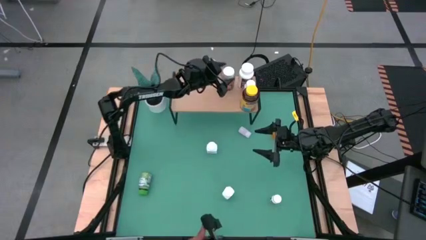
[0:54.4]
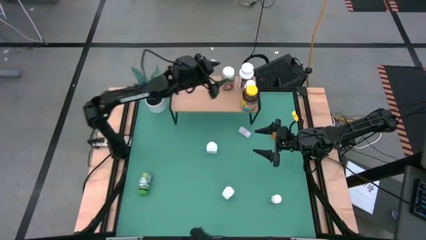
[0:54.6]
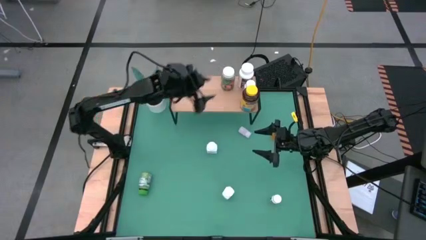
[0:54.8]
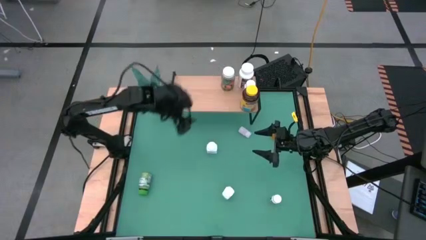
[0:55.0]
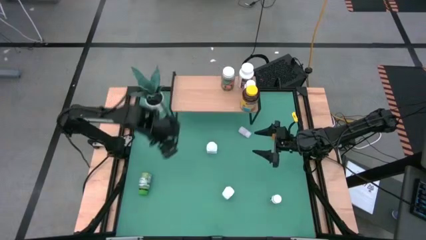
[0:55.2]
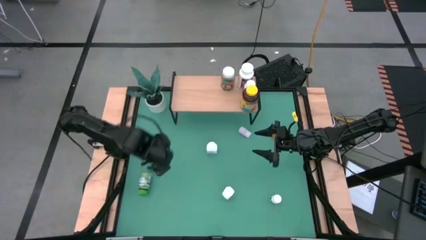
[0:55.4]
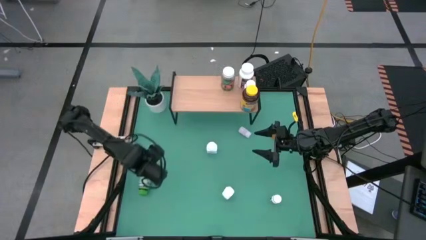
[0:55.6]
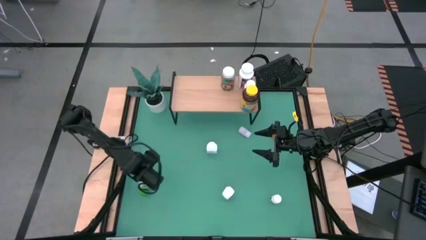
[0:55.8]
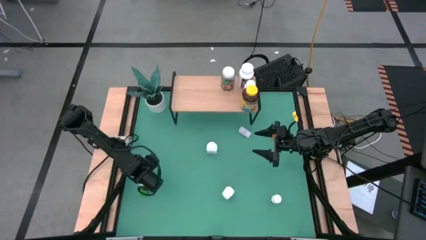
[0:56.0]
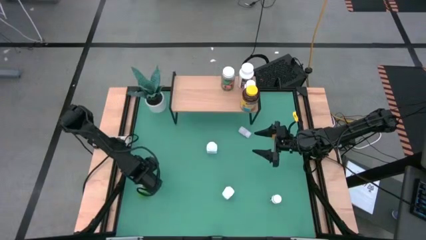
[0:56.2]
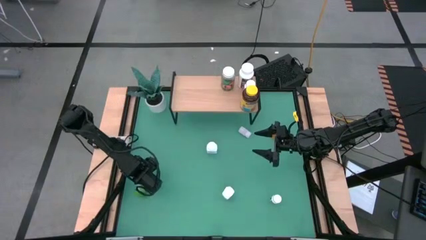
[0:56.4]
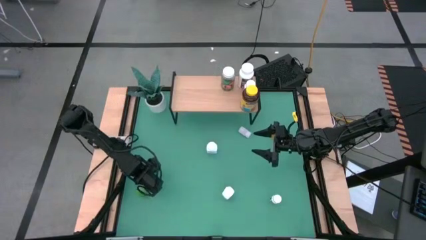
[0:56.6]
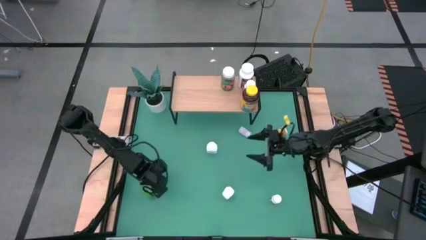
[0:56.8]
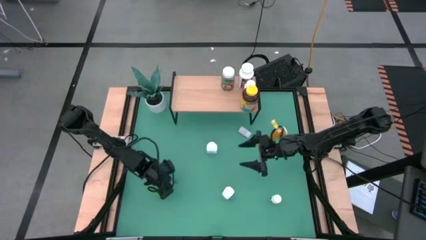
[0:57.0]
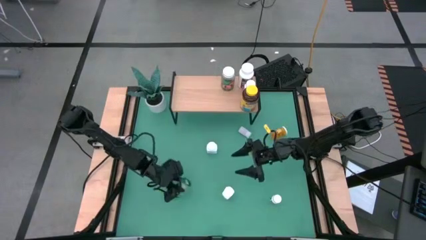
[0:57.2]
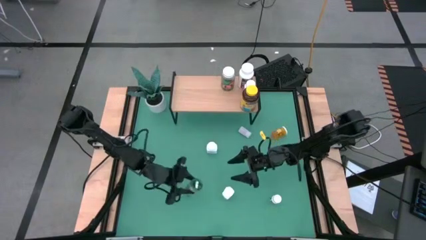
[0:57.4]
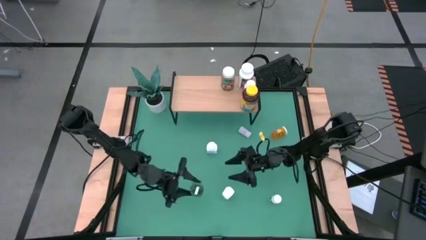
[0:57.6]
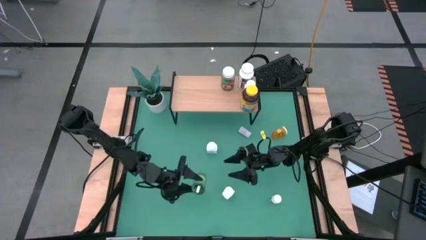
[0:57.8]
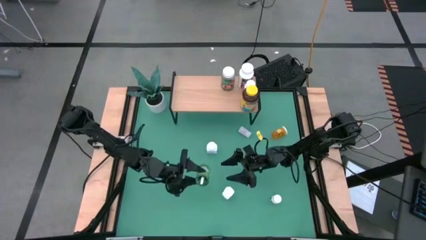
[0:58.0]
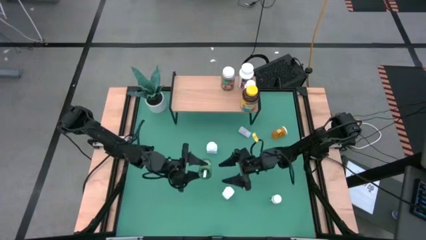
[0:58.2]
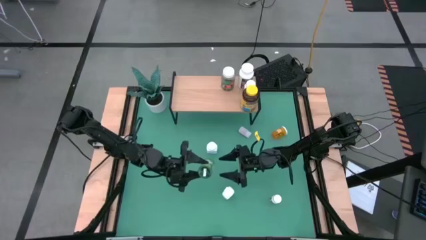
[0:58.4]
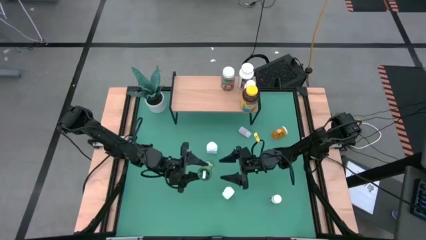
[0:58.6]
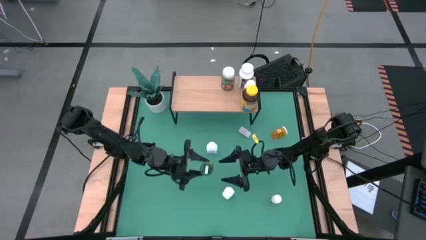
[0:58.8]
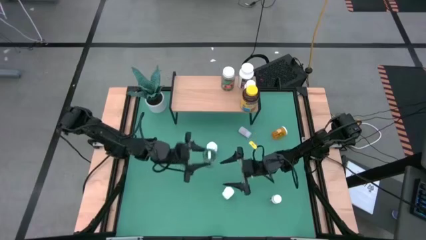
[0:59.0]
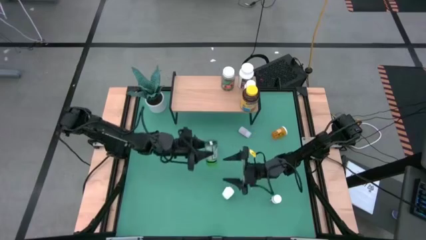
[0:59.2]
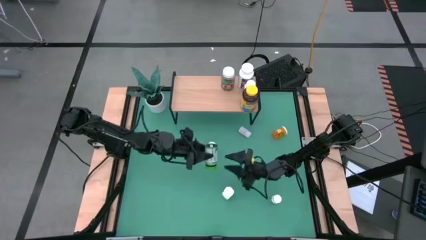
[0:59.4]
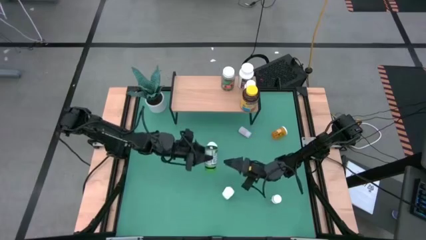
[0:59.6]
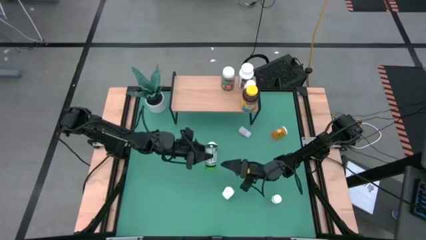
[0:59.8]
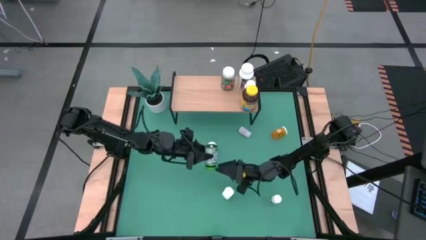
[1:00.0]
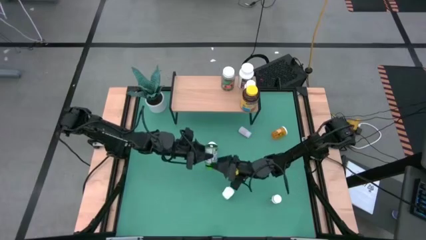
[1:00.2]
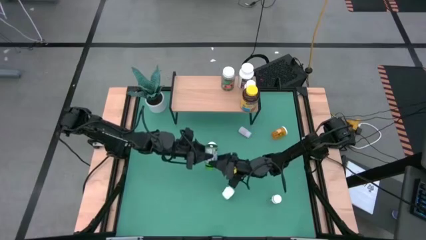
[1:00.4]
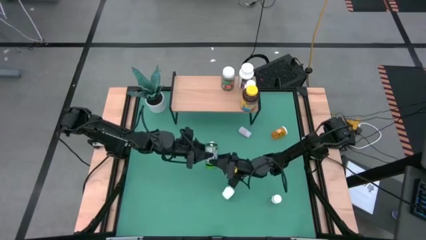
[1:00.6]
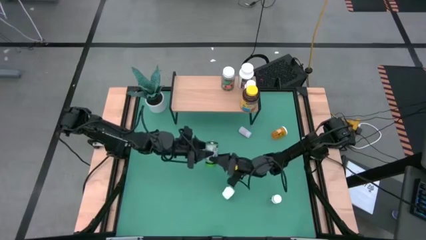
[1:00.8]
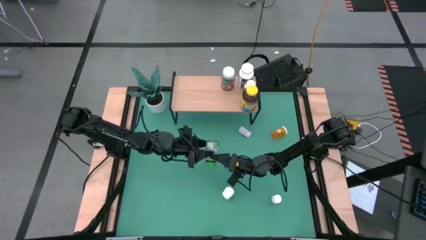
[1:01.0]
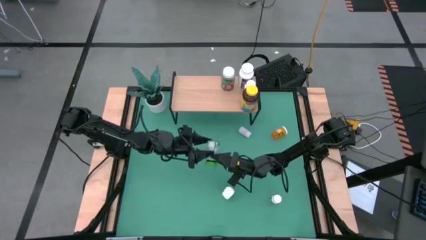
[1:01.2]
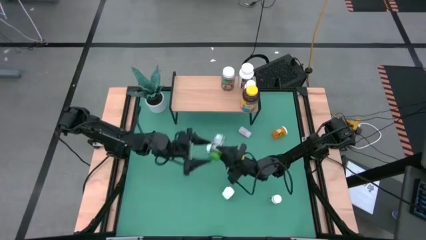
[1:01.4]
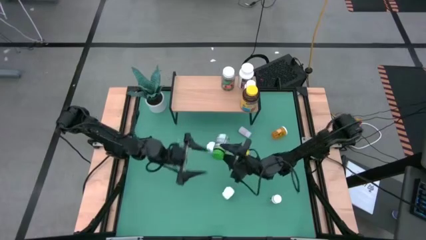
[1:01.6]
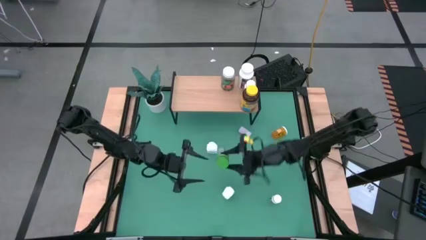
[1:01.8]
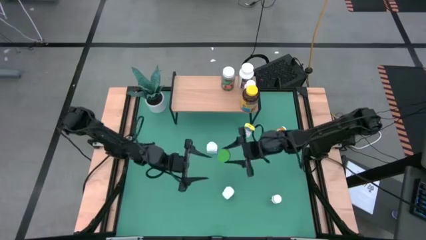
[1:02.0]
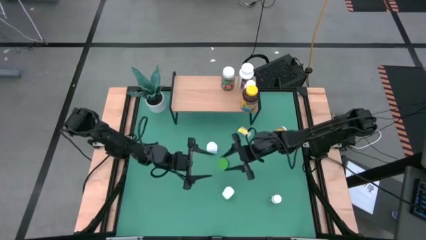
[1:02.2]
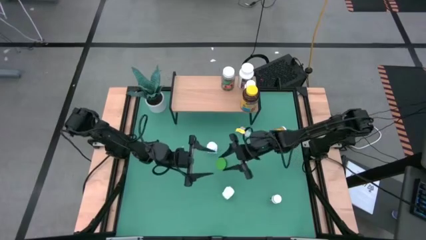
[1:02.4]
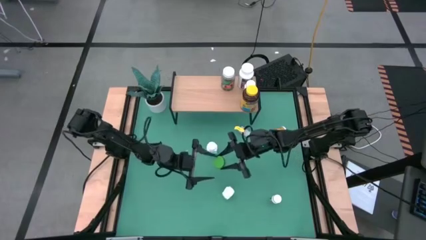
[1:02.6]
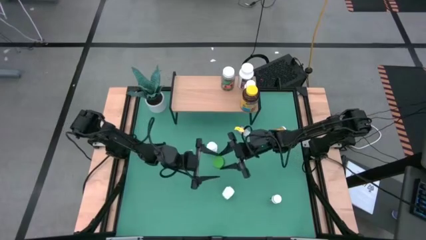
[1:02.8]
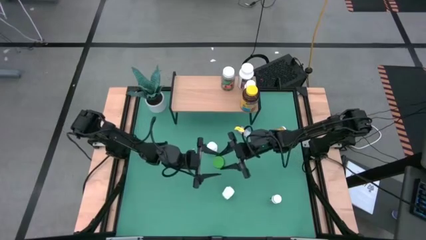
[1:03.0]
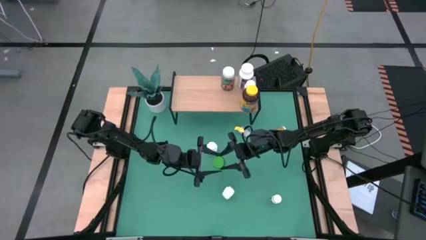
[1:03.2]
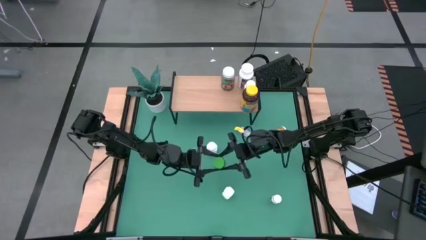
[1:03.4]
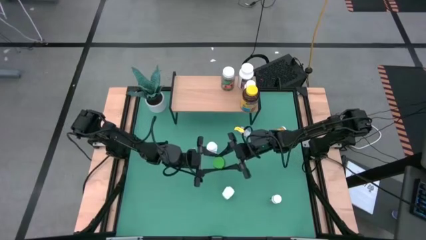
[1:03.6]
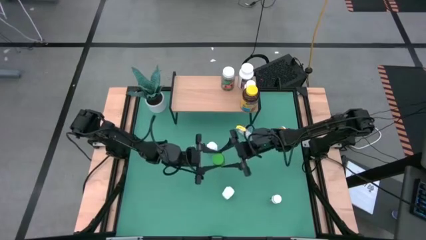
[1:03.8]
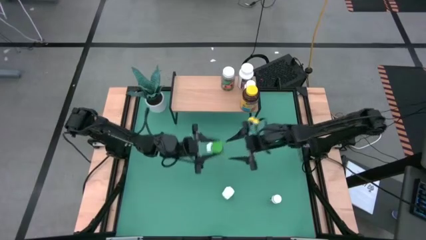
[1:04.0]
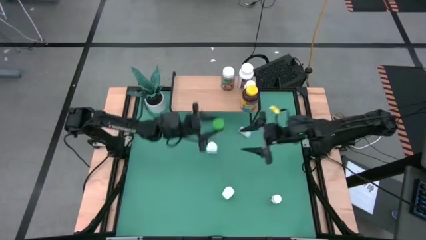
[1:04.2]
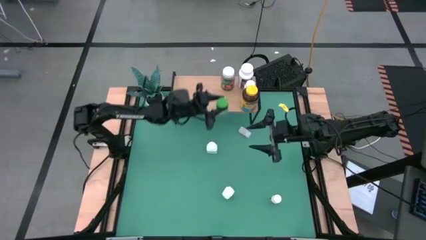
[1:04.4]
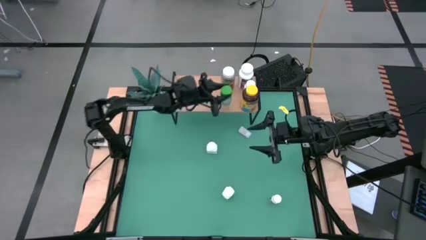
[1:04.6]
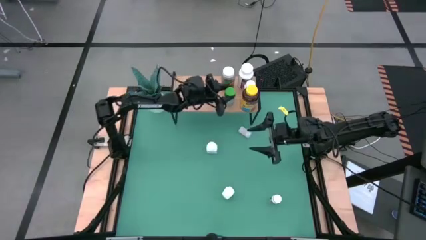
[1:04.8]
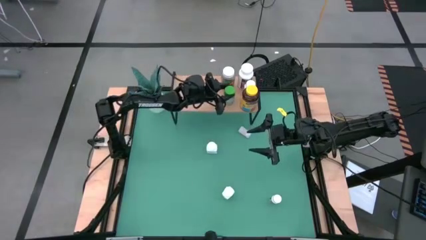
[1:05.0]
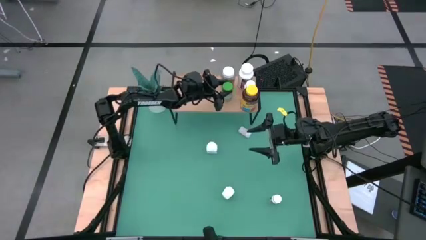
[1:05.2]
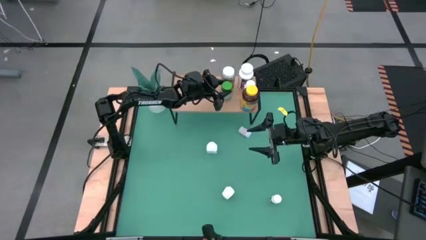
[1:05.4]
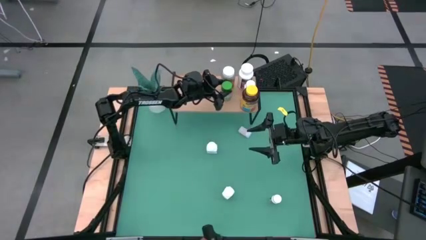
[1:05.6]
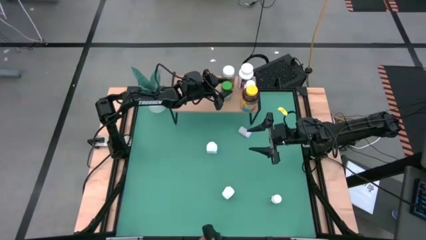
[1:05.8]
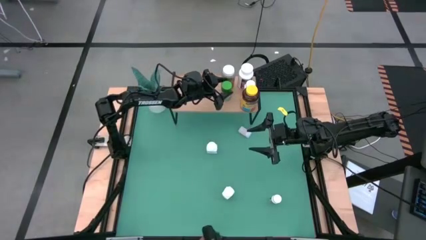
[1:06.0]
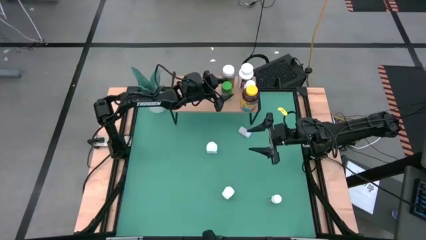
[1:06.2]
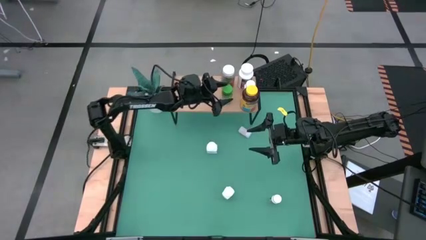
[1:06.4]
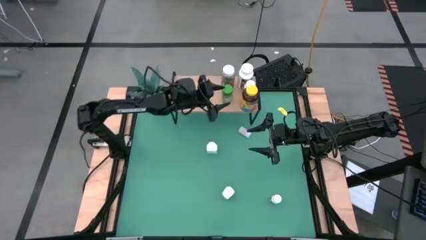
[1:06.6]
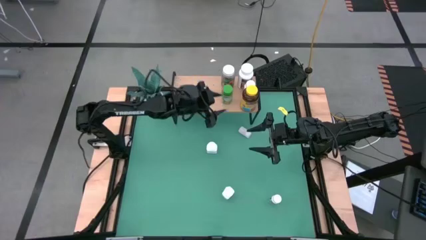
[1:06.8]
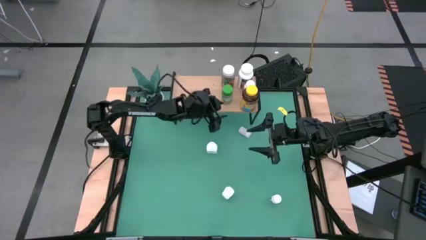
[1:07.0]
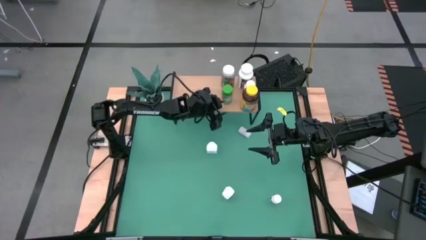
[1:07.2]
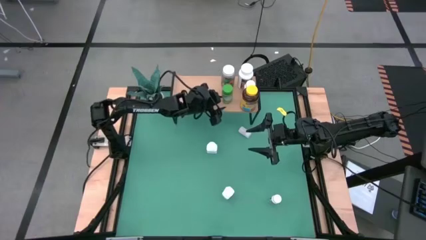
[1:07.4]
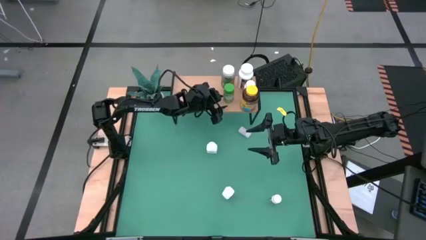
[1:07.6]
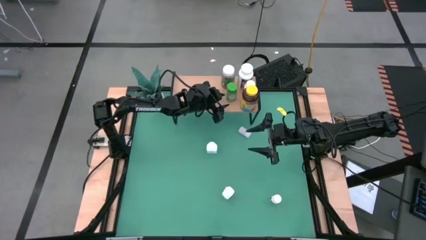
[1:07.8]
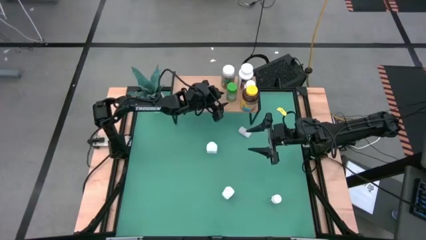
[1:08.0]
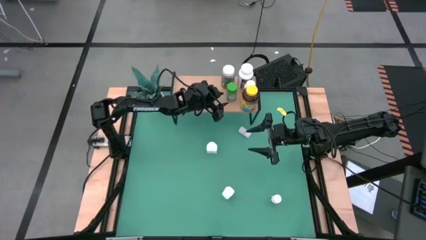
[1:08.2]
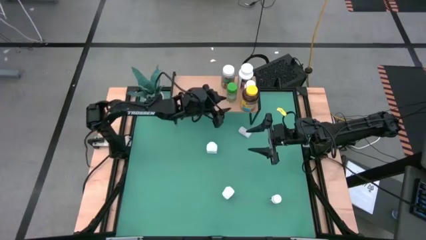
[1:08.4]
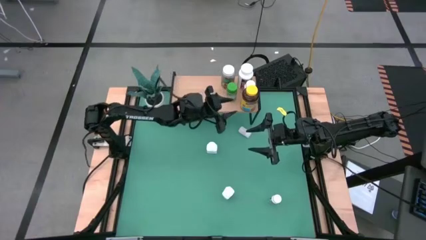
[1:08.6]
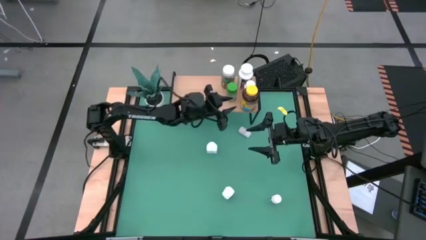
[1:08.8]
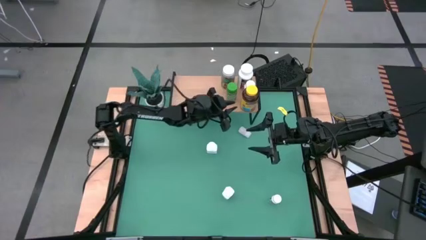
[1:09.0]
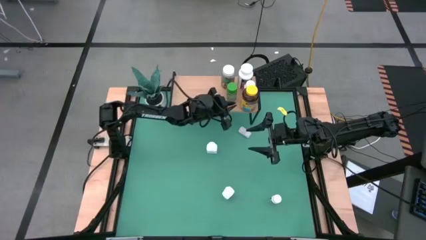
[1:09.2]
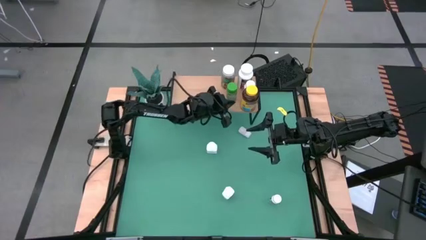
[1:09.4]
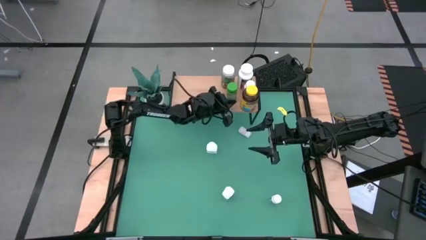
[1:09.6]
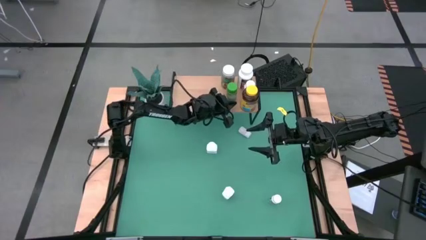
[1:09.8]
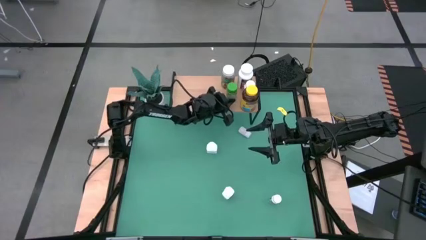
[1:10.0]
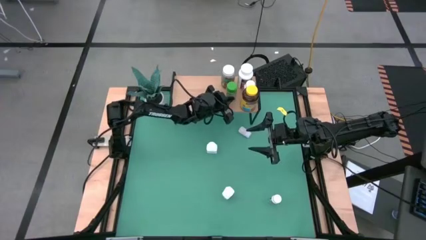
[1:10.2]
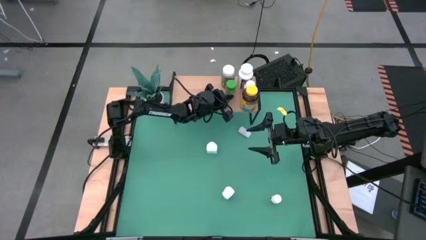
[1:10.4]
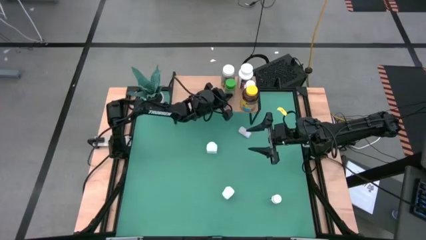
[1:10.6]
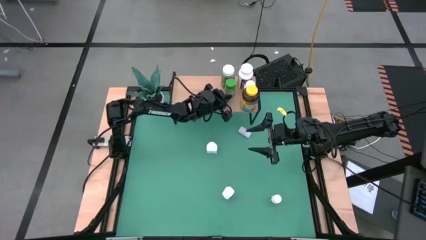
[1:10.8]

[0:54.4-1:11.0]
Task: Pick and place medicine bottles onto shelf by color
Put the green medicine bottle on the shelf
